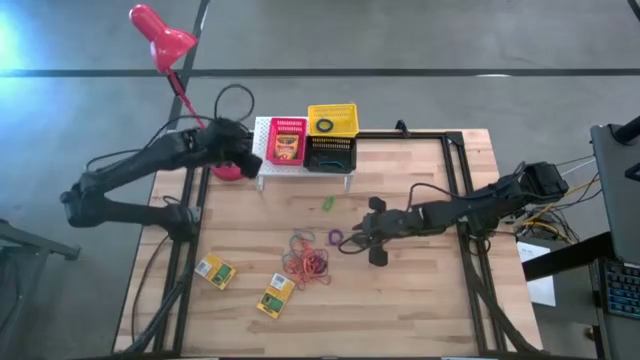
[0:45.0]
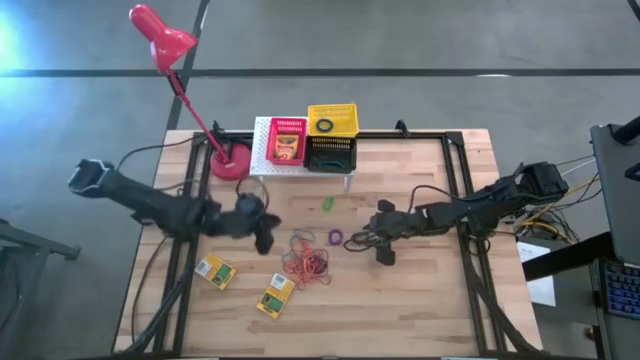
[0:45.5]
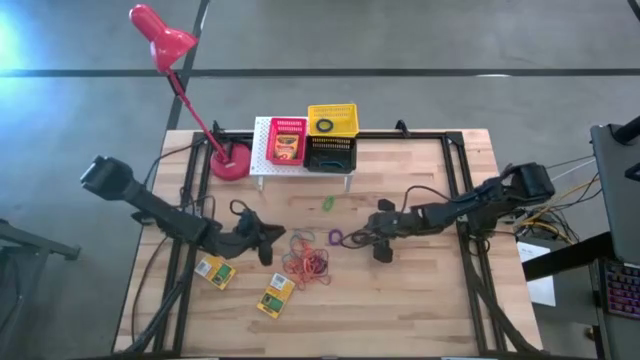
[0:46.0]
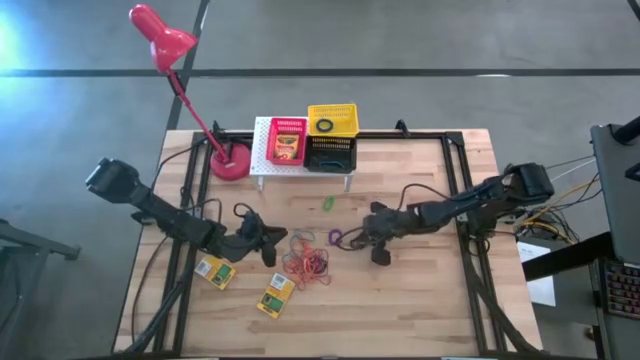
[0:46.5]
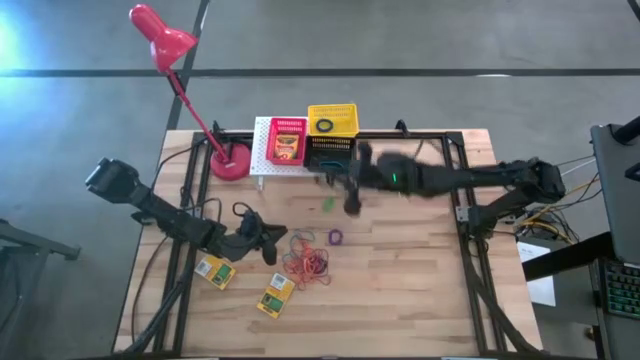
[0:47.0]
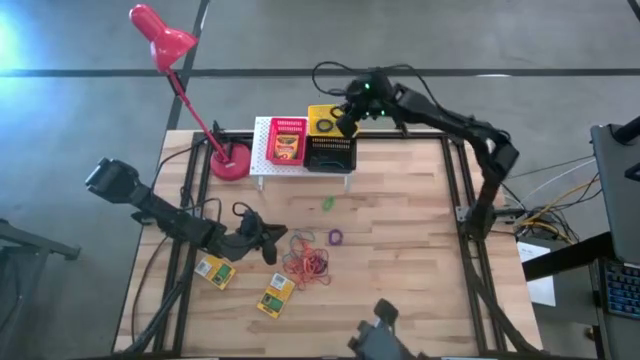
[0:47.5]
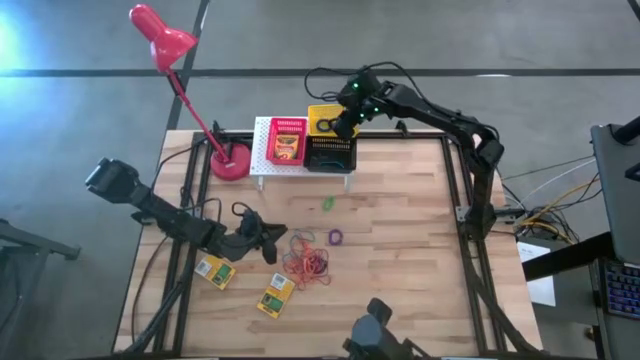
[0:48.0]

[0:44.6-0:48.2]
Task: Pick & Place Office Desk Supplies
Put the black spring keychain into the yellow bin on the shelf

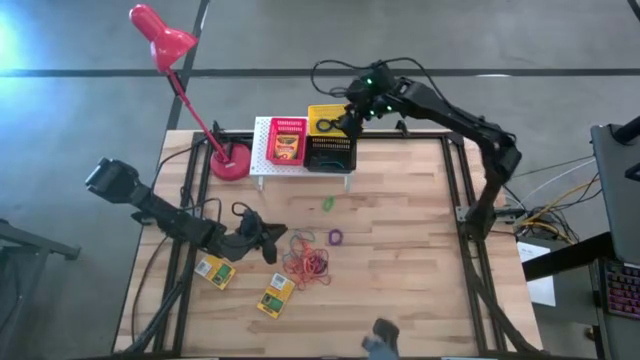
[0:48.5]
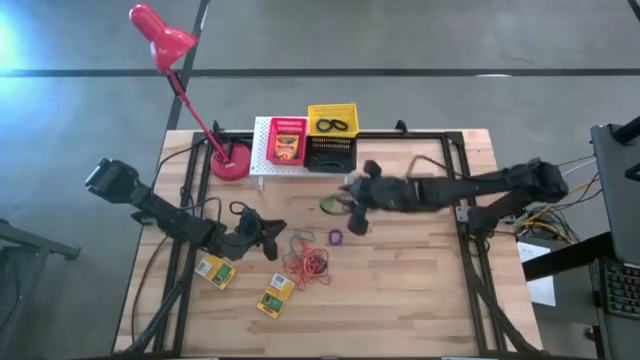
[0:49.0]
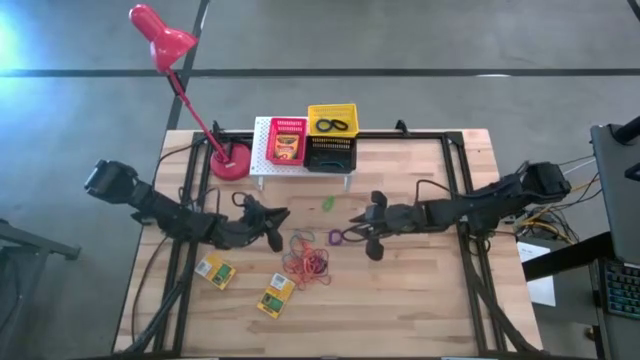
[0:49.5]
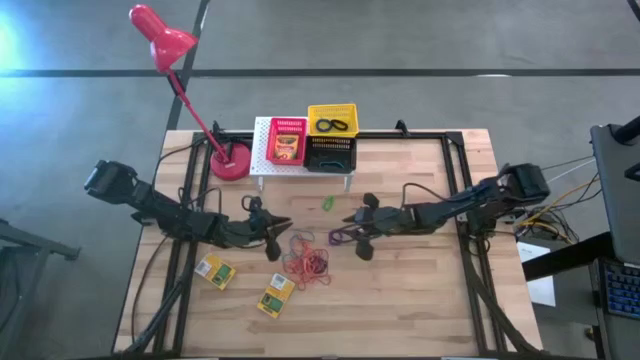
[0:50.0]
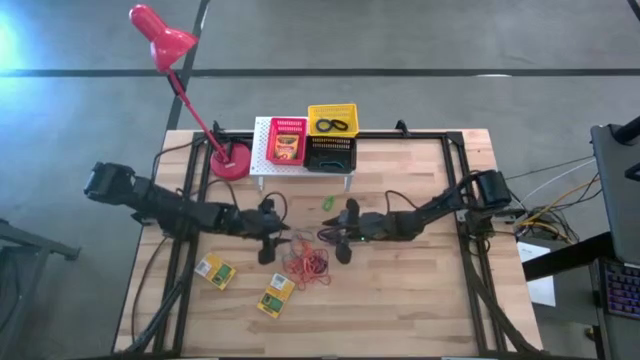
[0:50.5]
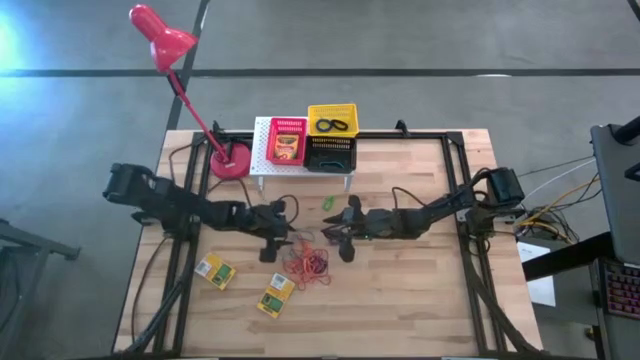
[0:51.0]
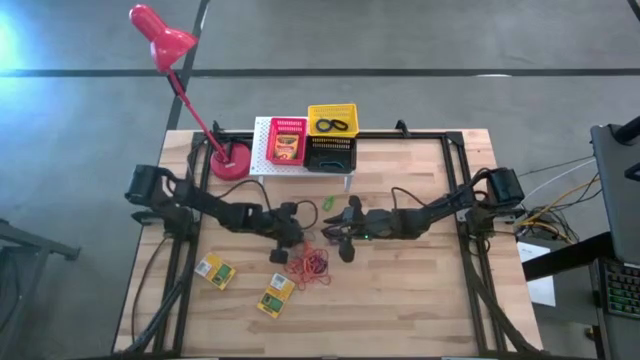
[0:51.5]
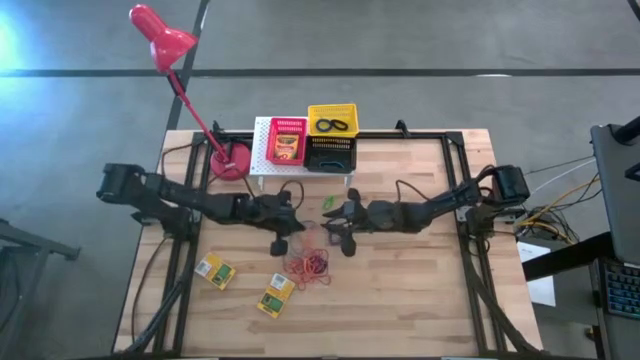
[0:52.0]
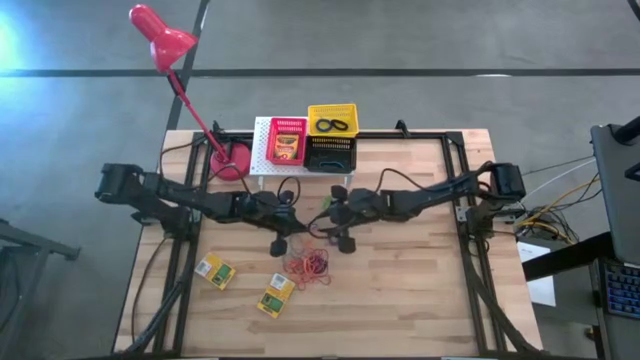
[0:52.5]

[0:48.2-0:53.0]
Put the blue rubber band into the black bin on the shelf

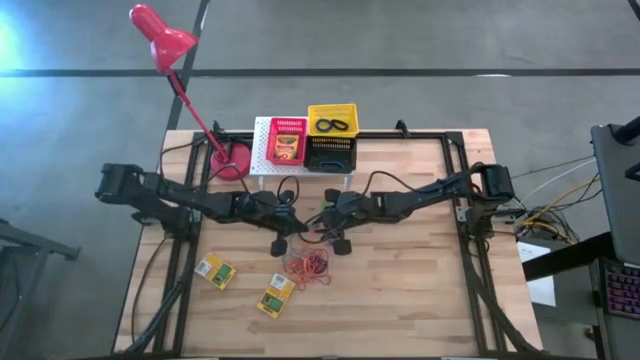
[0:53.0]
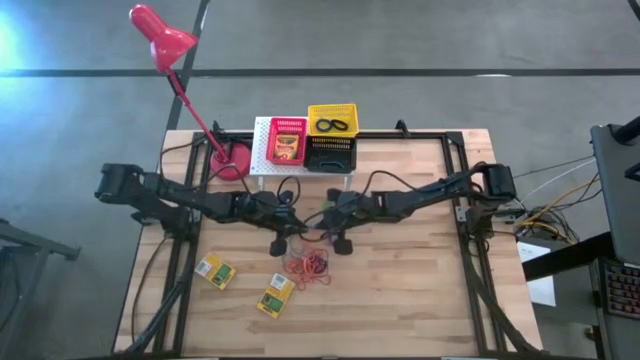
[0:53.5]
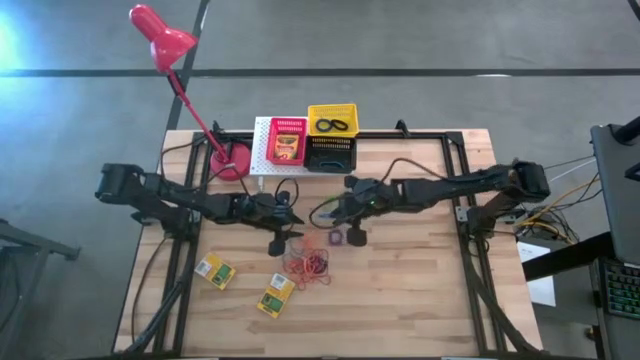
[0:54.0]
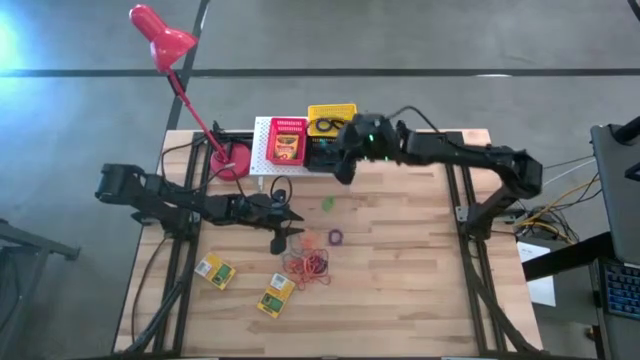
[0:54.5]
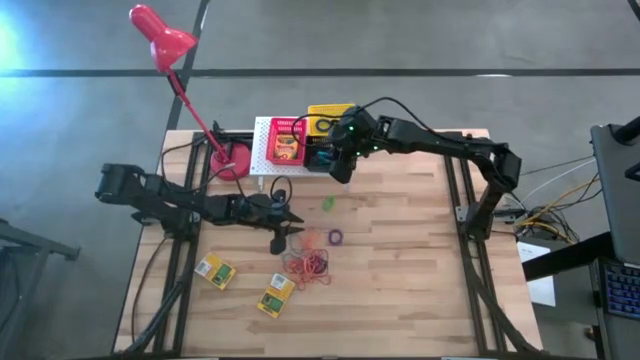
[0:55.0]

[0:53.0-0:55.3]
Put the blue rubber band into the black bin on the shelf

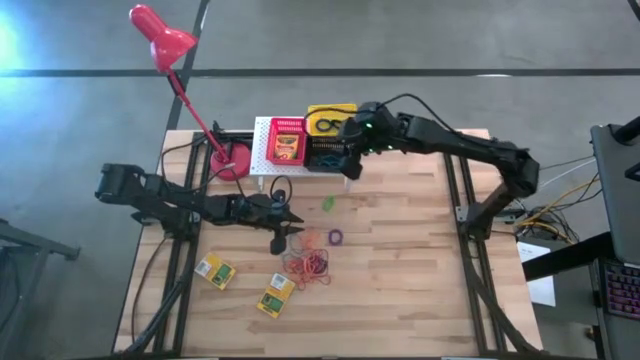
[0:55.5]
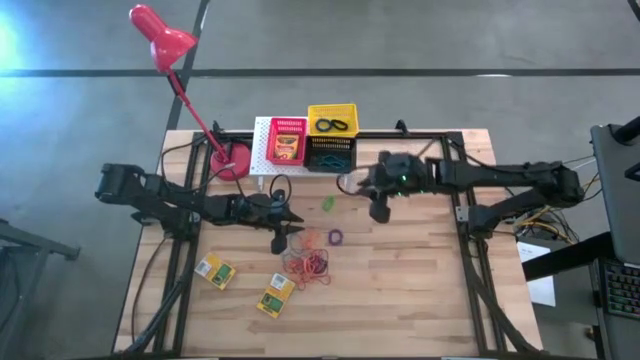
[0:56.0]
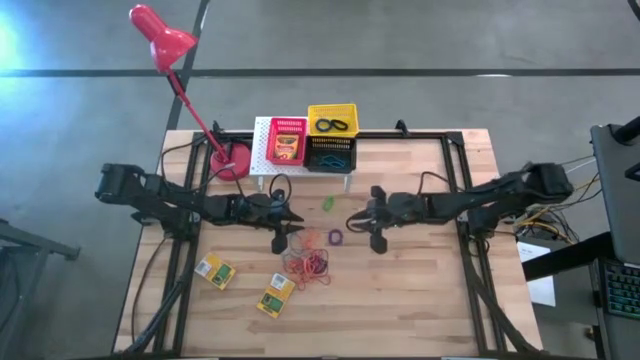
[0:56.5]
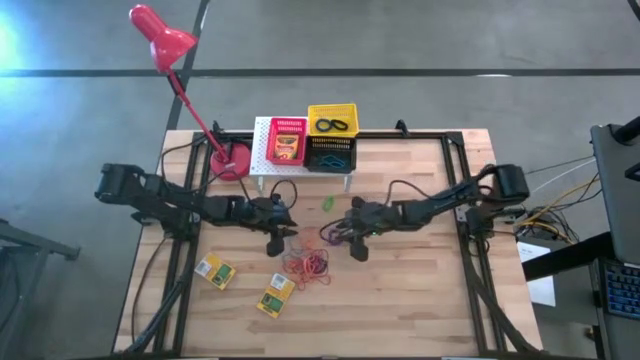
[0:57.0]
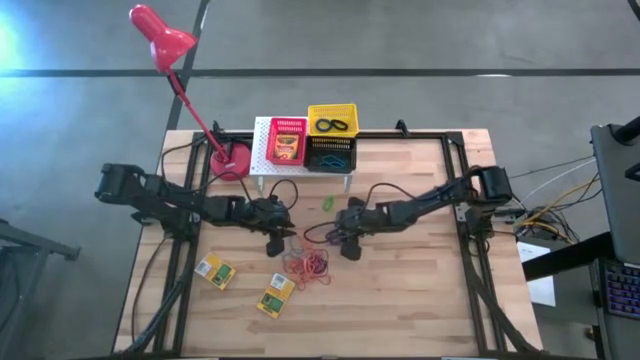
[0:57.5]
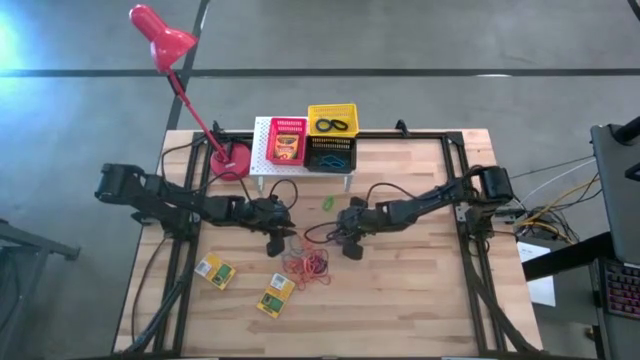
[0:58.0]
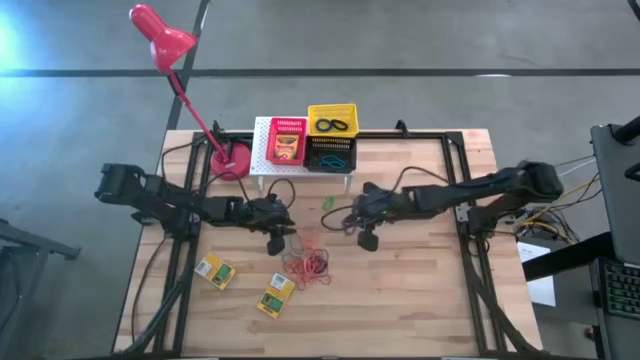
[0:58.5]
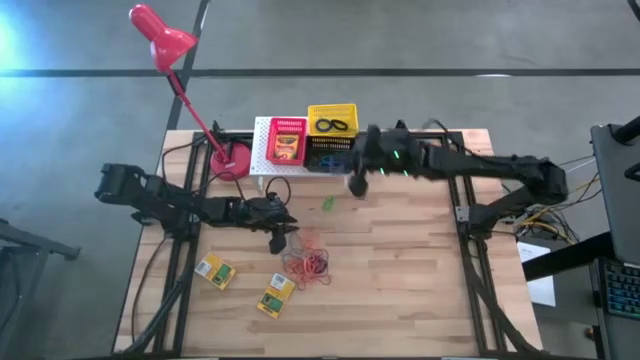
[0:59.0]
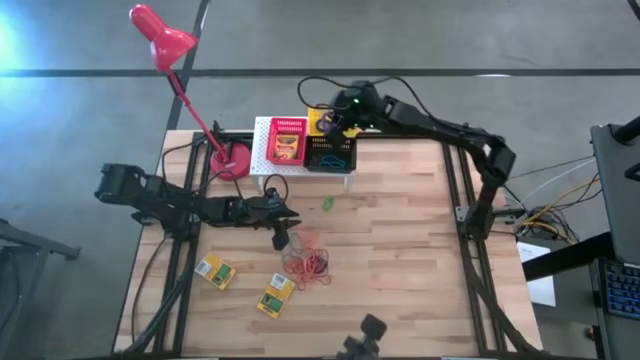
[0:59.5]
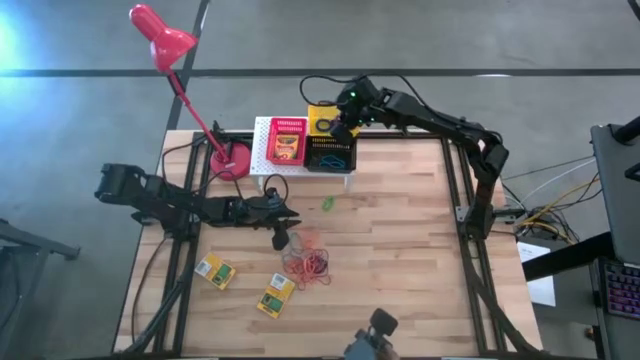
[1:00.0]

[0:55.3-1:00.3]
Put the purple spring keychain into the yellow bin on the shelf

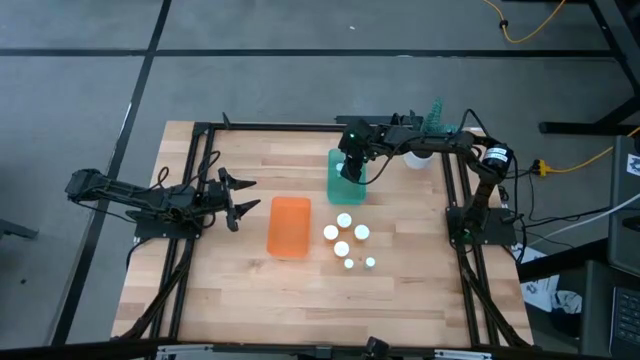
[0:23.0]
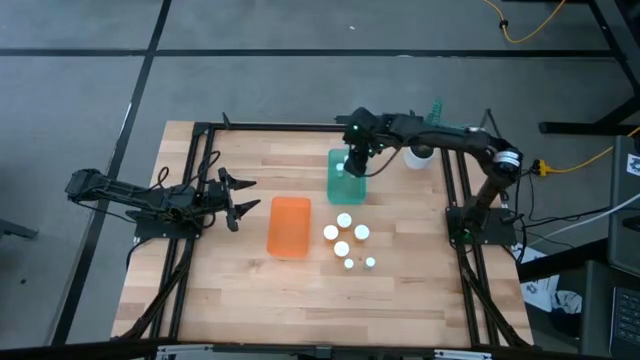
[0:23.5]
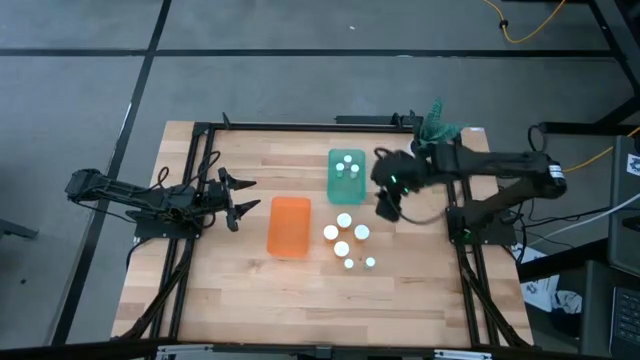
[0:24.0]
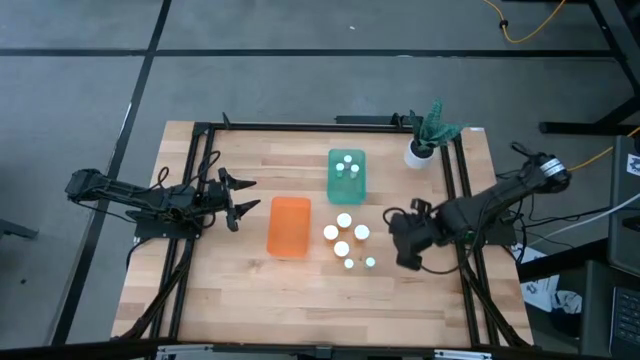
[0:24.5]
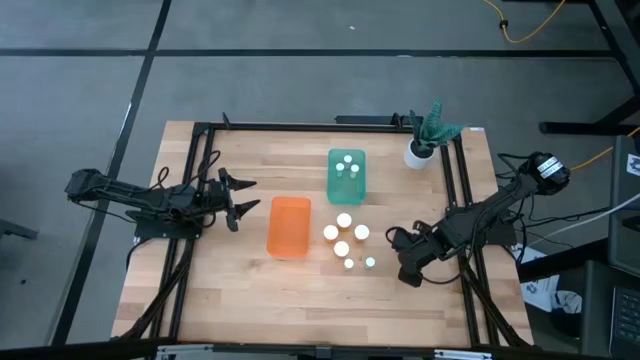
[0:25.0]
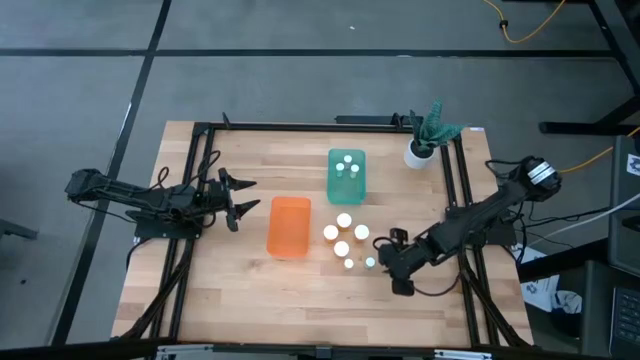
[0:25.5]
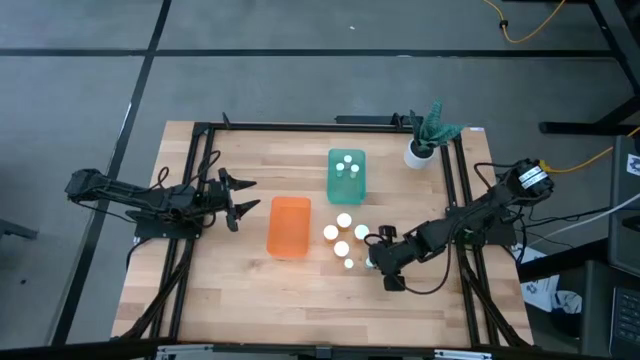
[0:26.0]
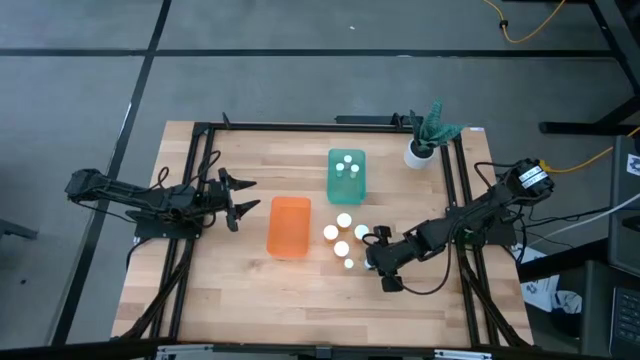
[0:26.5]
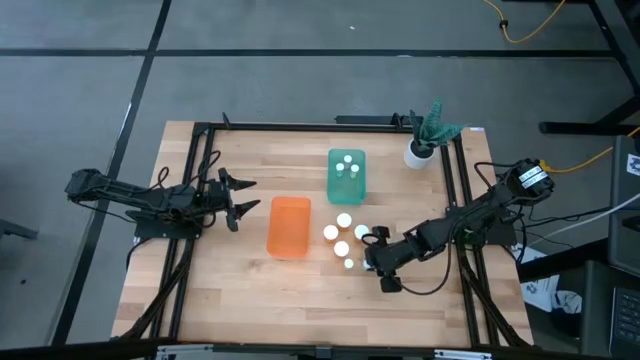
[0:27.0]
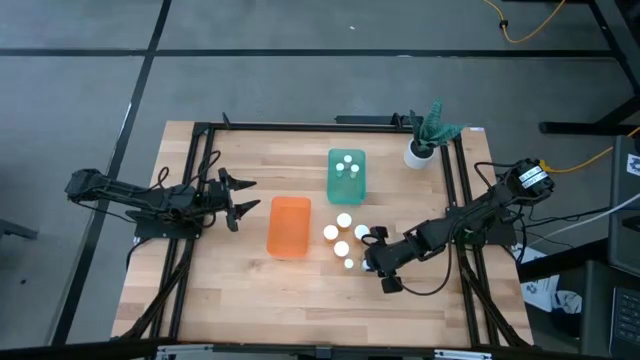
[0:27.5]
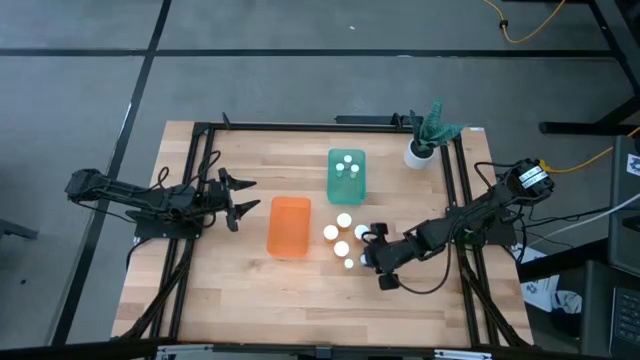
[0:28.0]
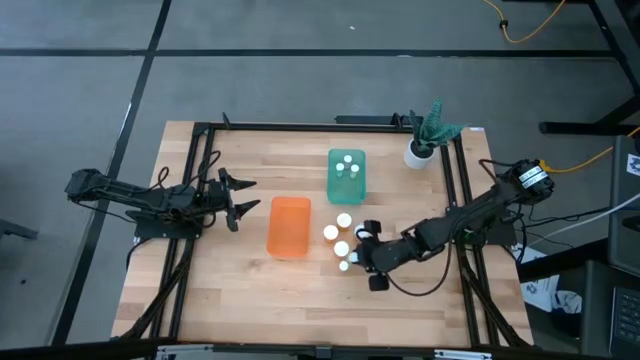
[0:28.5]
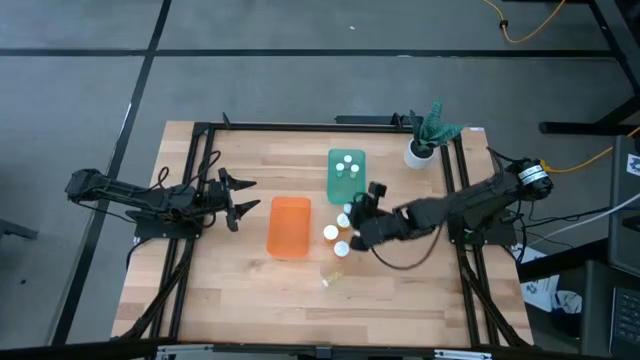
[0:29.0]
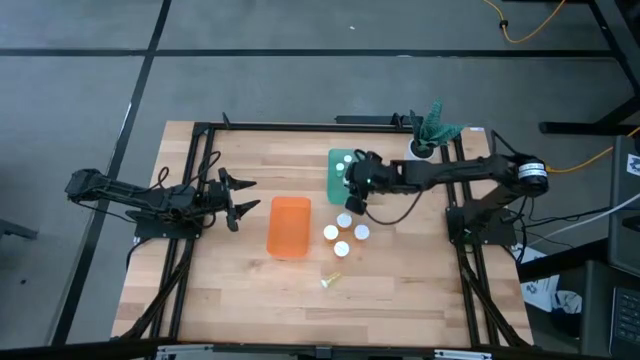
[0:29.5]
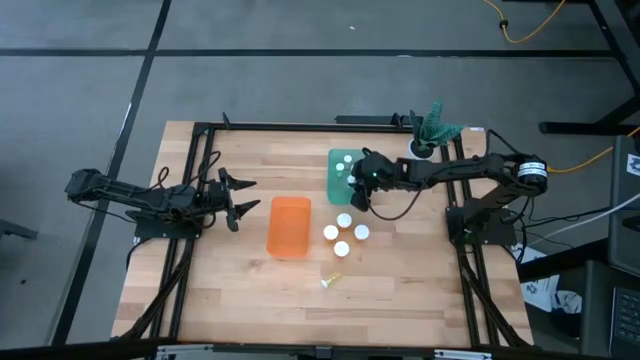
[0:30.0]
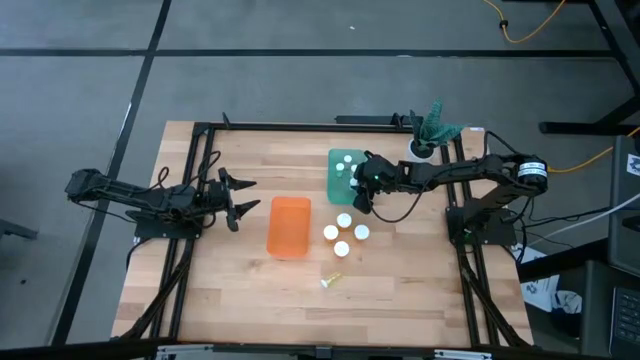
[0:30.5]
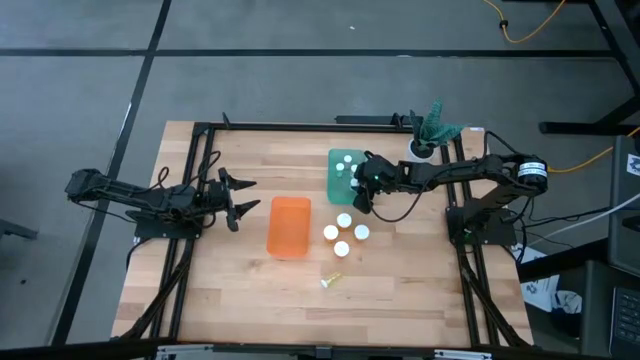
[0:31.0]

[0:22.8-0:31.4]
Task: Pick and place medicine bottles into bin by pill shape (circle, oval)
Put the small blue medicine bottle into the blue bin
